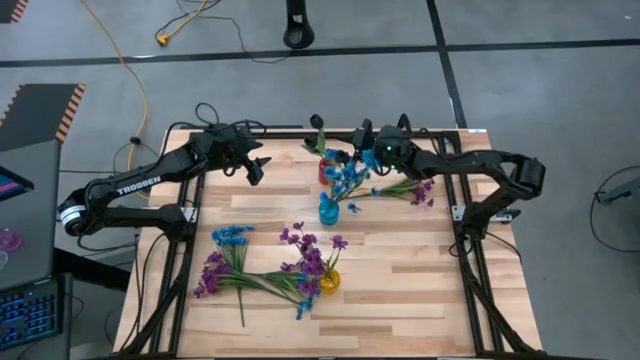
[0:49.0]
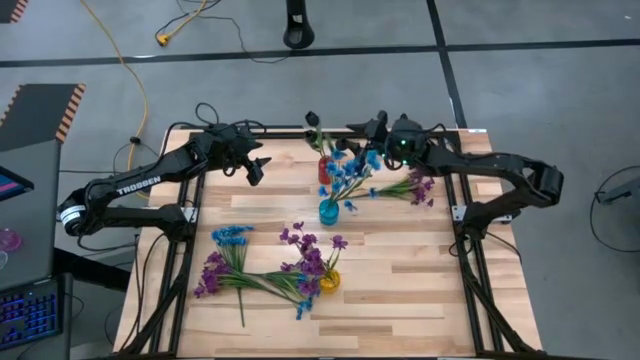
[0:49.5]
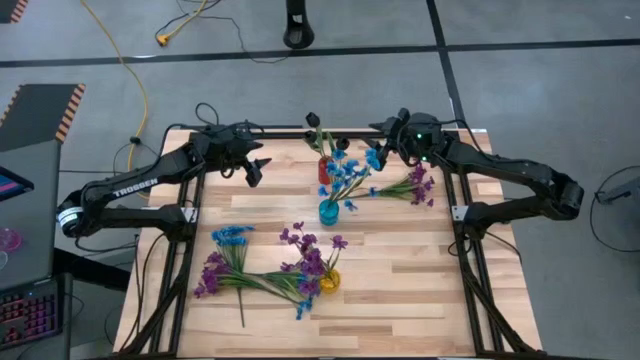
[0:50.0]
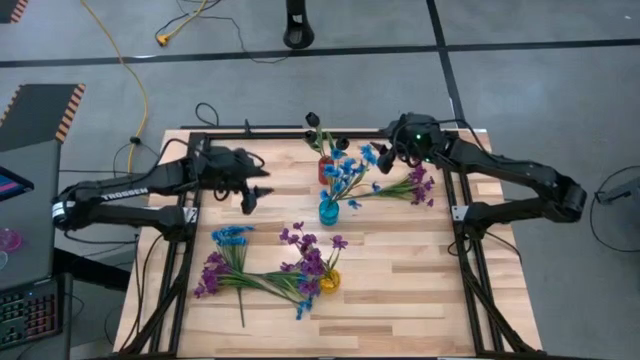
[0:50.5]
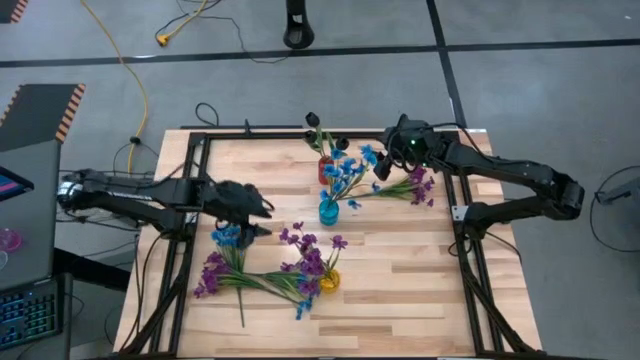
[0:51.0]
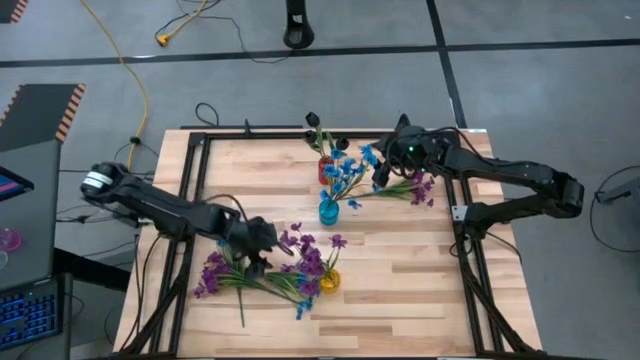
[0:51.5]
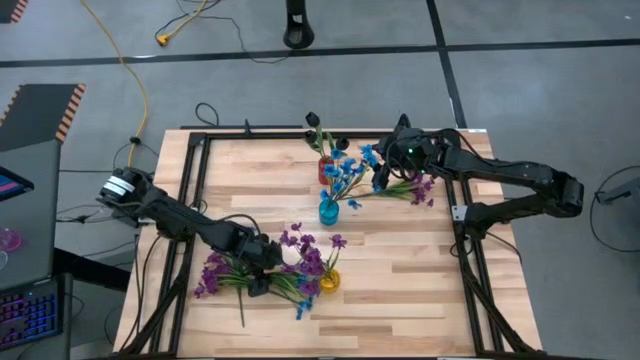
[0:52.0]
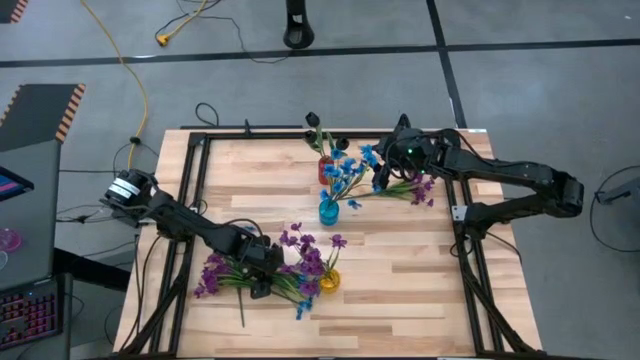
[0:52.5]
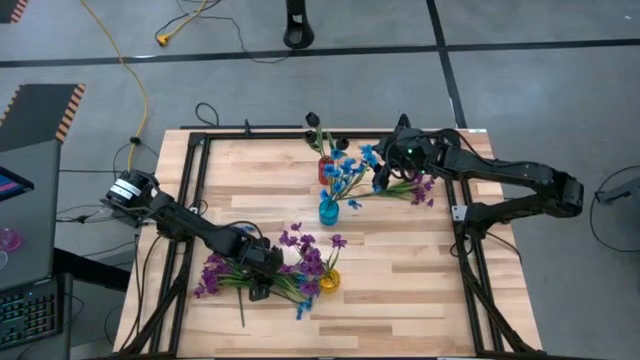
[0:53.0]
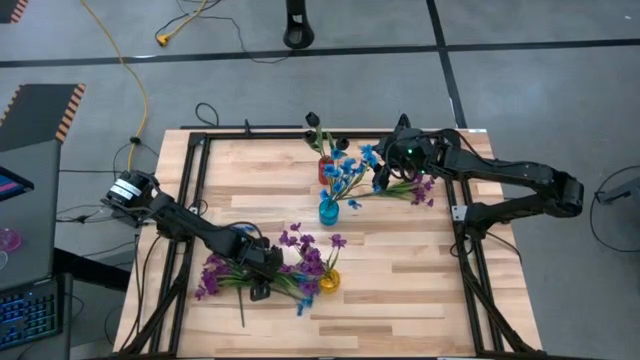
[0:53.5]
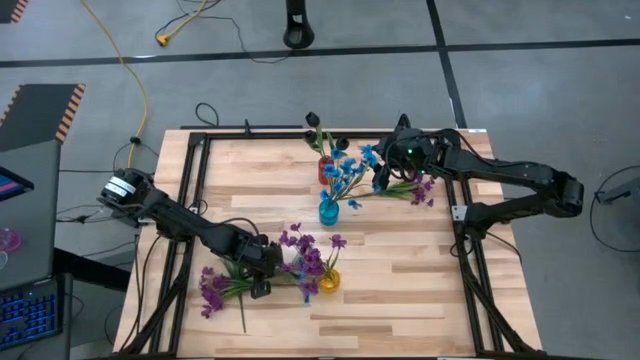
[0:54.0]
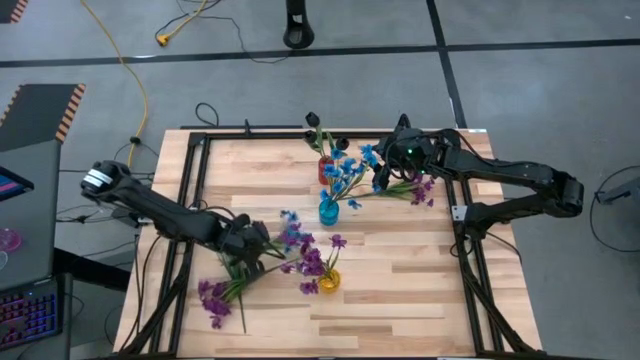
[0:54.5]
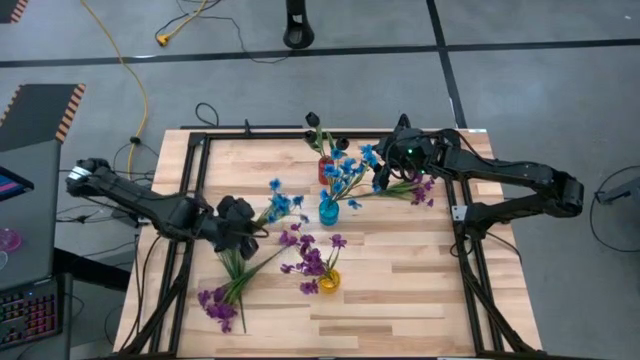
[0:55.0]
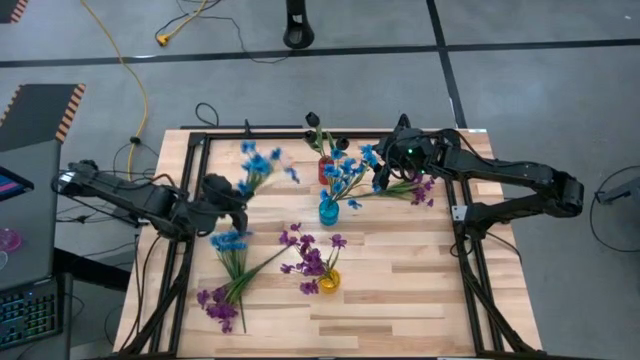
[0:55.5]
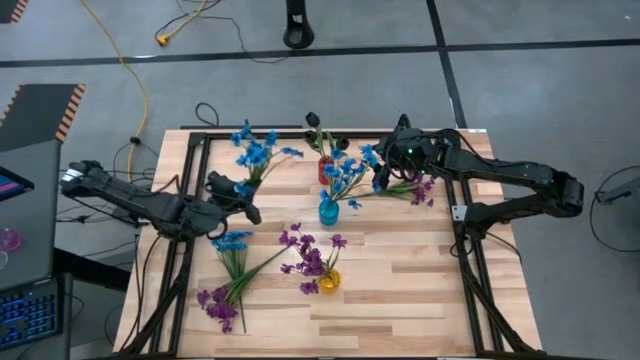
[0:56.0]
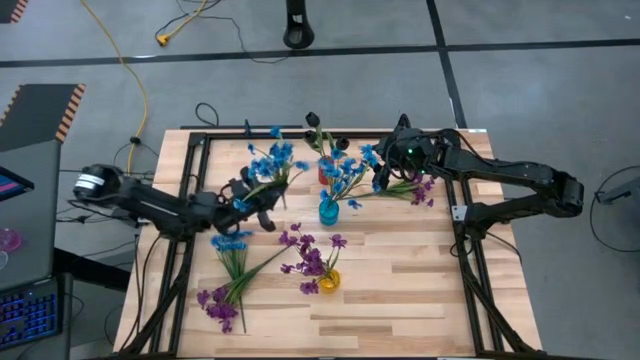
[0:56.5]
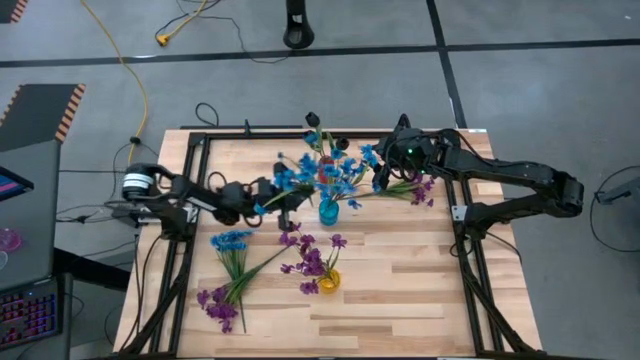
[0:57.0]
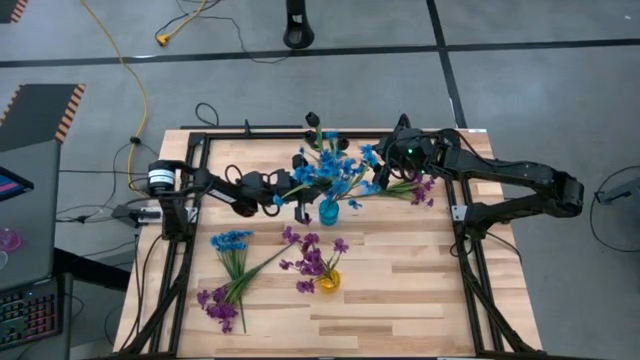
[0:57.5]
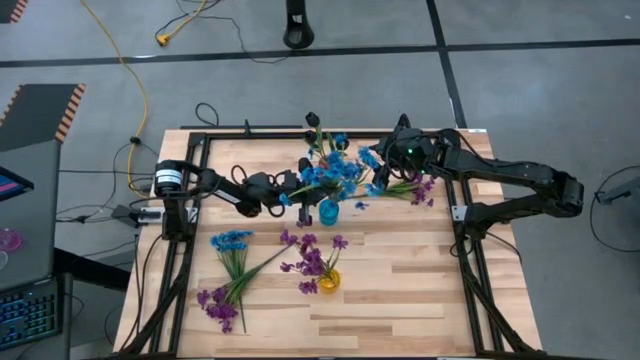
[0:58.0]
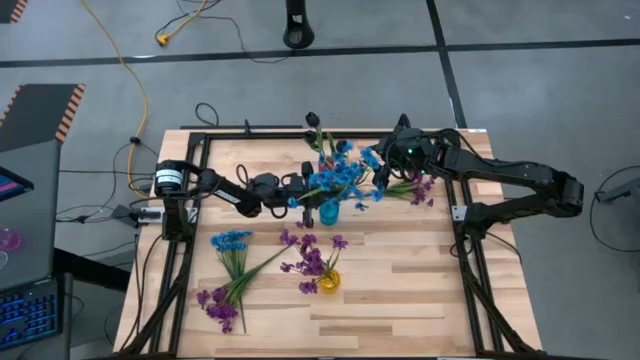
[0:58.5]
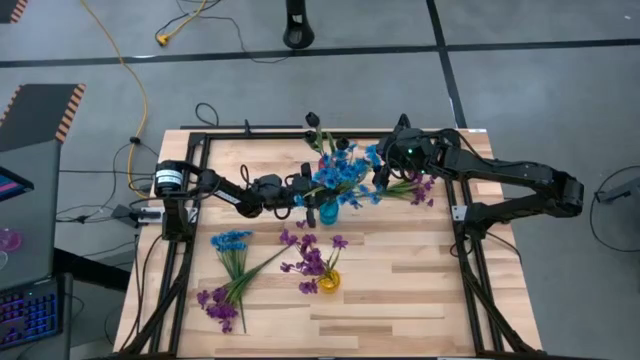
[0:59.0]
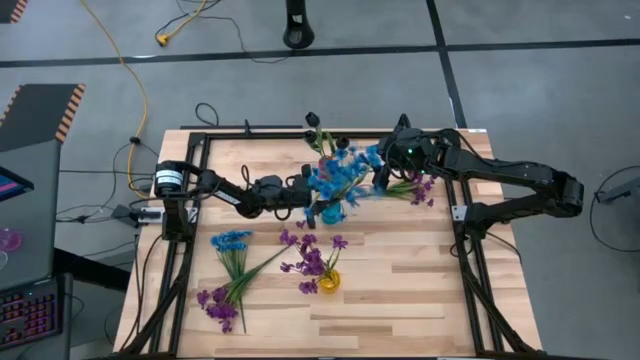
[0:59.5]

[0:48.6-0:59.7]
Task: Sort flowers into vase by color
Put the right blue flower into the blue crystal vase

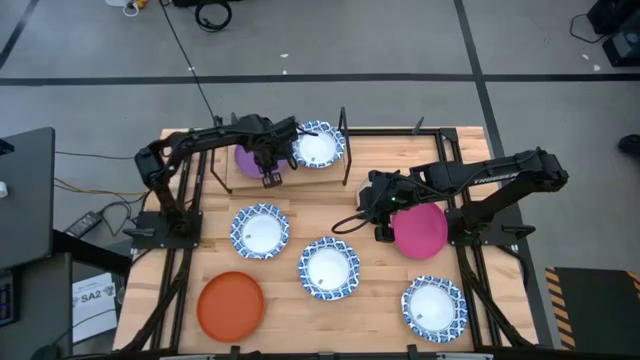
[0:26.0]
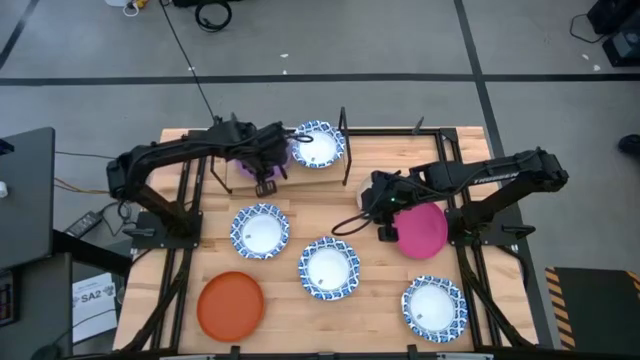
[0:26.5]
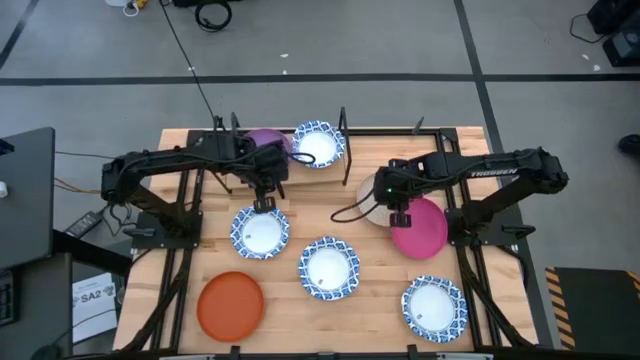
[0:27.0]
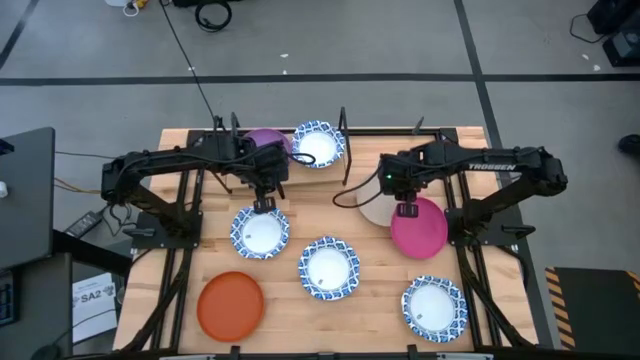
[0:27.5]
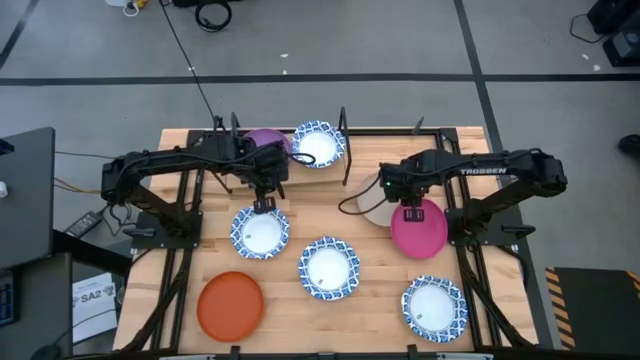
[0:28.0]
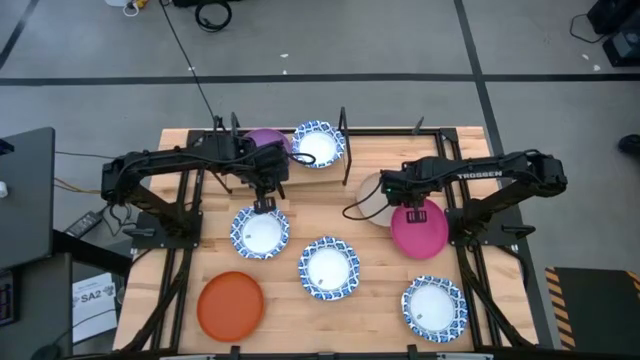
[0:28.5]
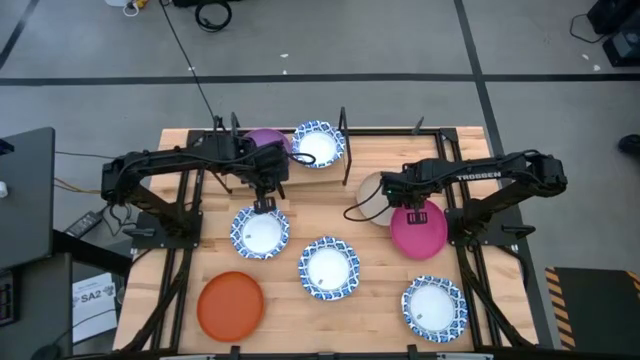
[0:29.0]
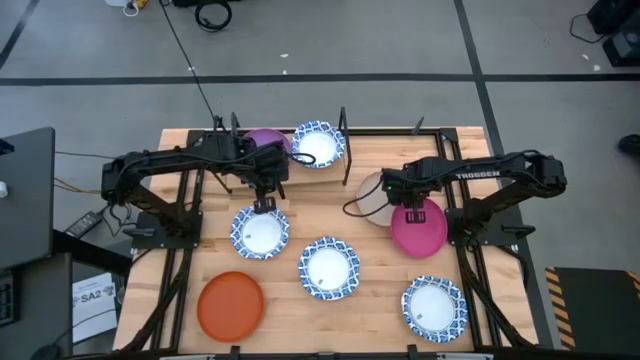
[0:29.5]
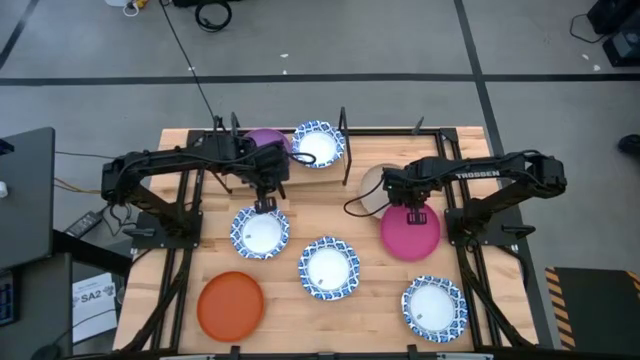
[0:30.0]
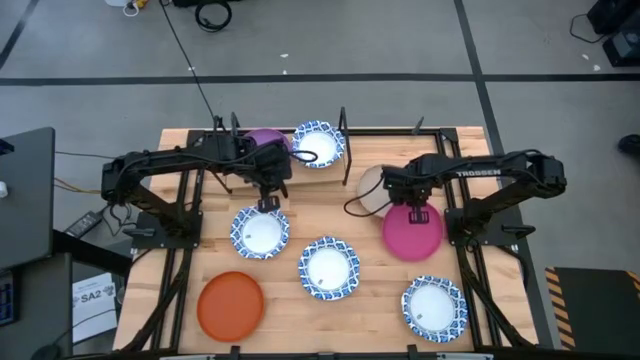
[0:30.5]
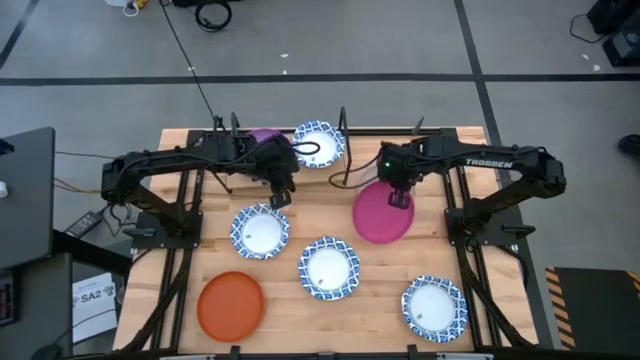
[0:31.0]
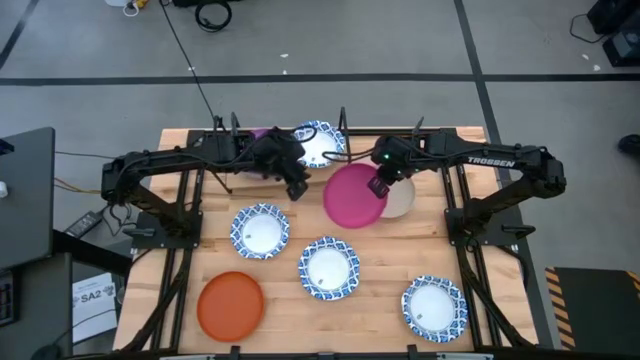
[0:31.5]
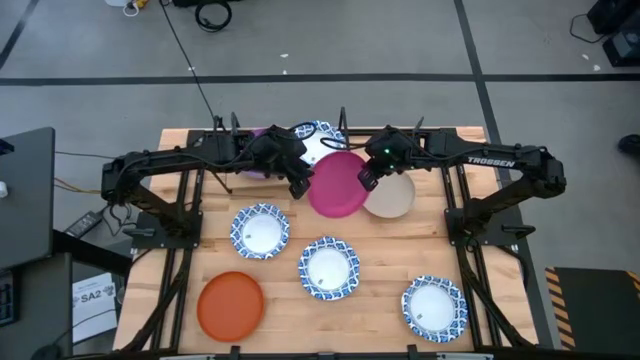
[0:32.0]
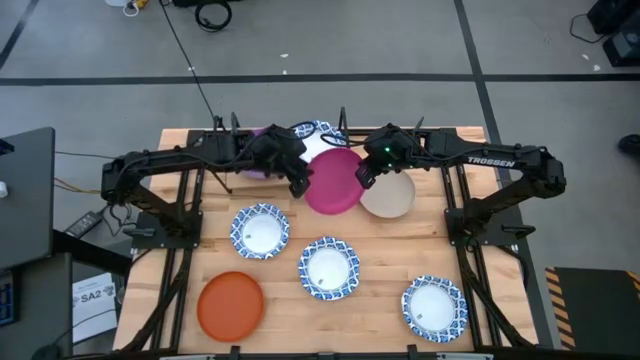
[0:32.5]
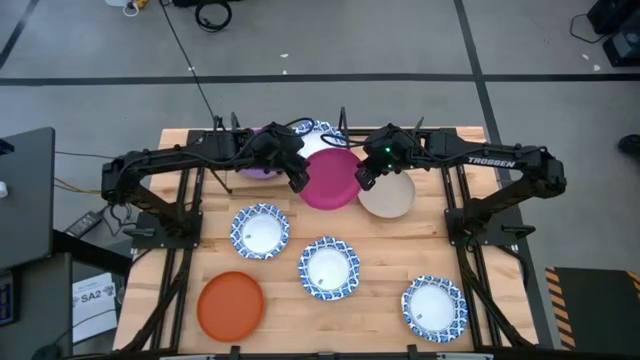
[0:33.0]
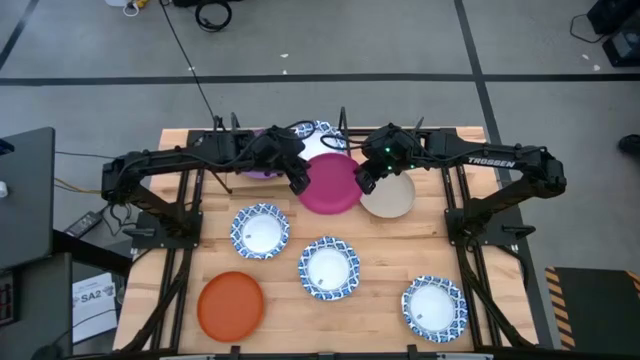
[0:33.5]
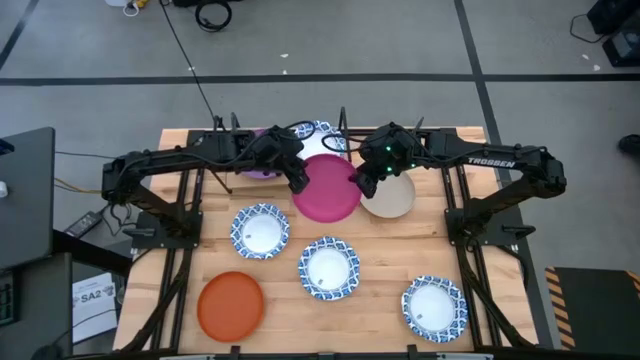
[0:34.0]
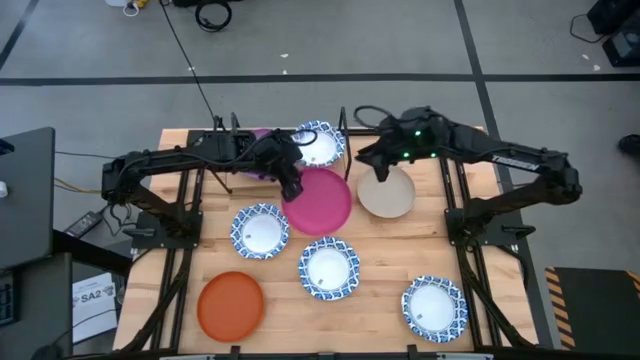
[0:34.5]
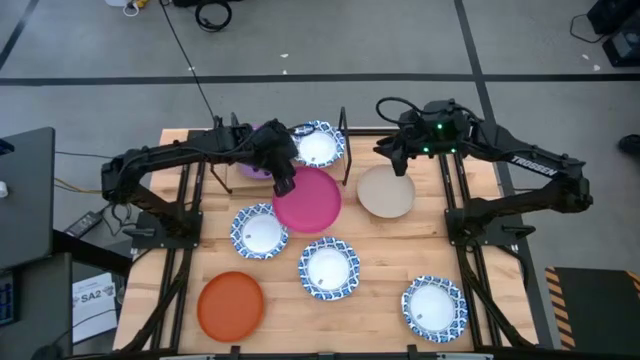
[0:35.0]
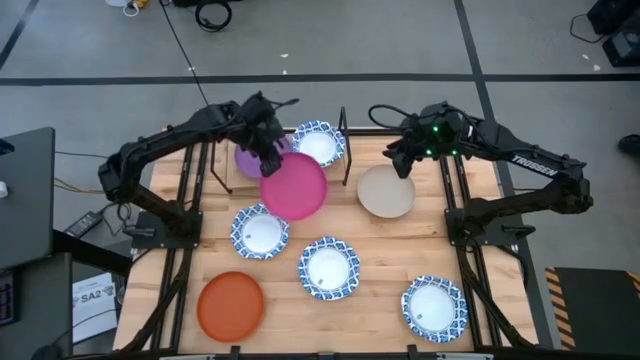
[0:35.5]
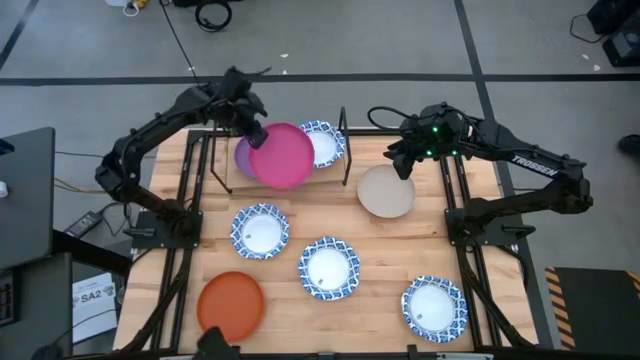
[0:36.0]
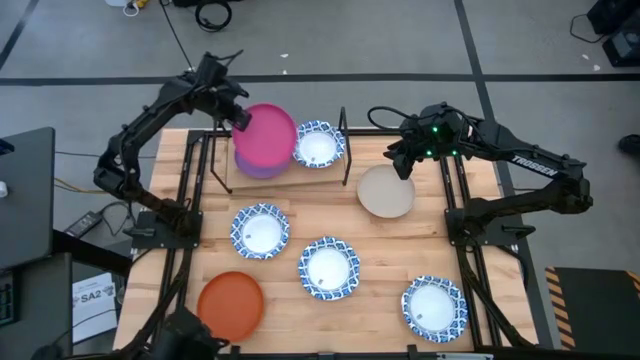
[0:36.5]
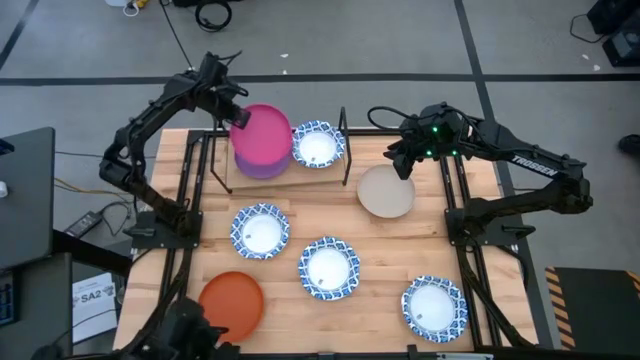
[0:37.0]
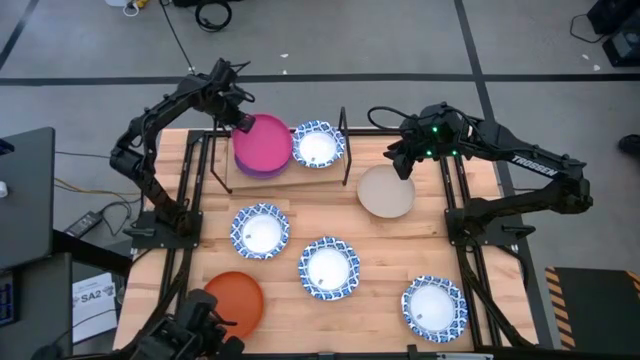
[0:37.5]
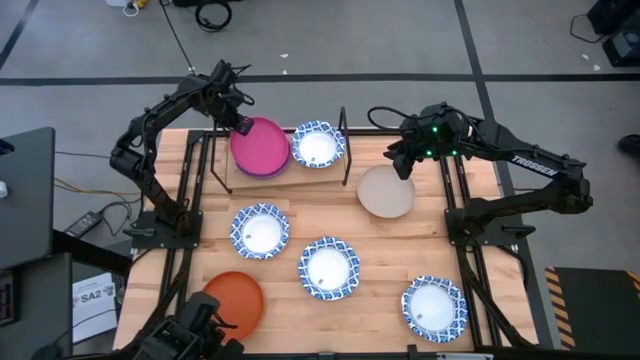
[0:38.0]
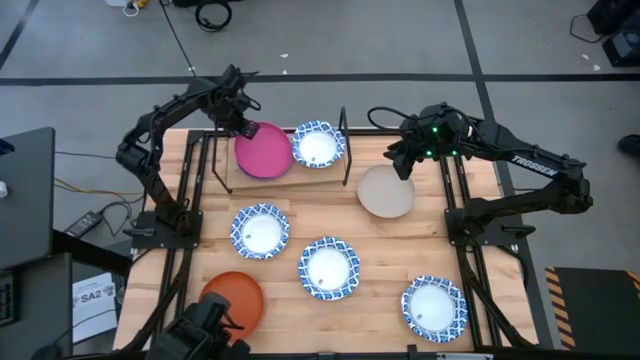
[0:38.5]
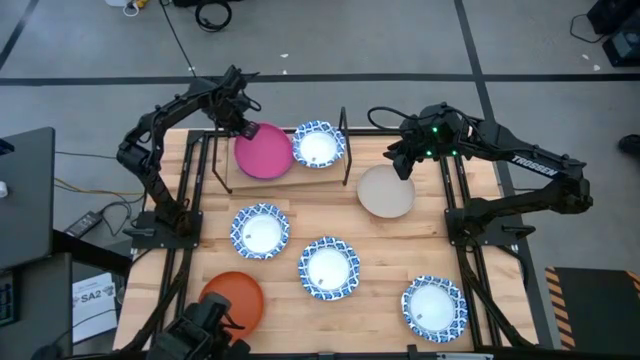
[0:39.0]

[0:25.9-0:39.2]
Task: Place and stack plates onto a shelf
Stack the pink plate on top of the purple violet on the shelf
